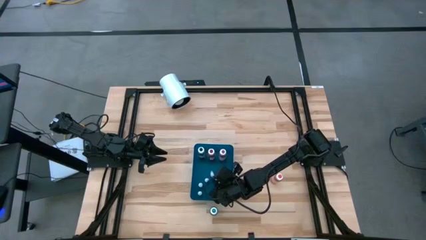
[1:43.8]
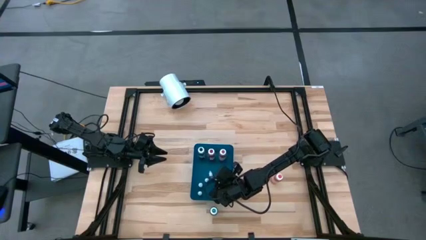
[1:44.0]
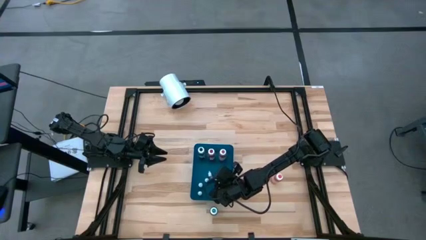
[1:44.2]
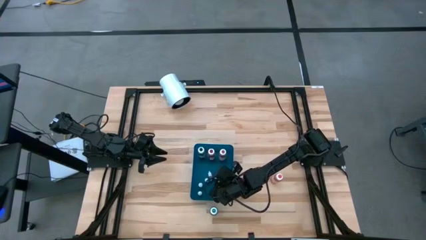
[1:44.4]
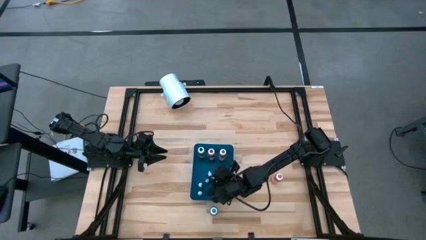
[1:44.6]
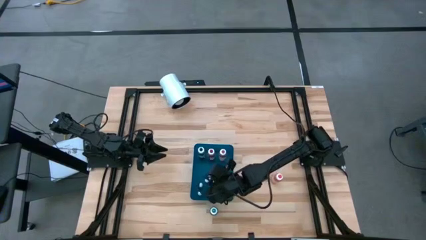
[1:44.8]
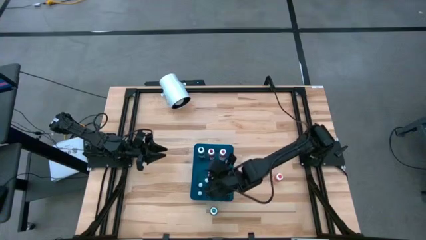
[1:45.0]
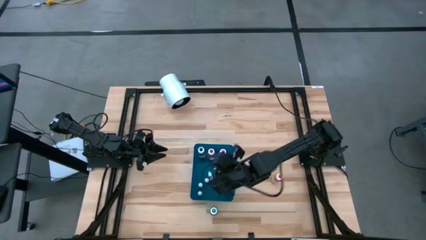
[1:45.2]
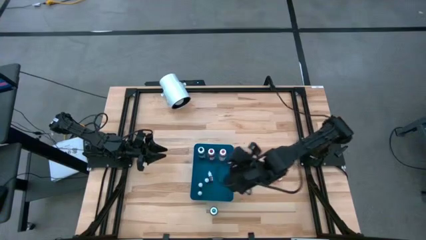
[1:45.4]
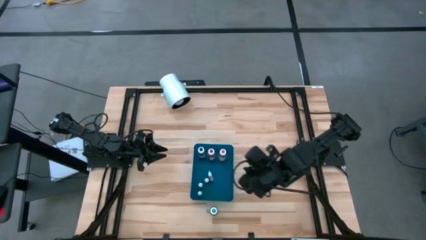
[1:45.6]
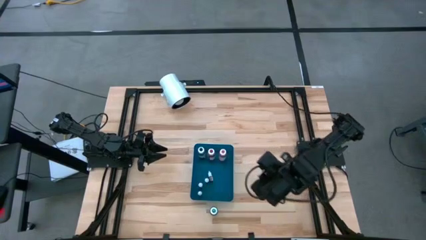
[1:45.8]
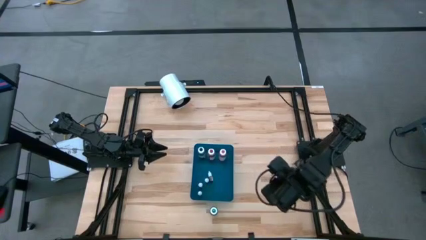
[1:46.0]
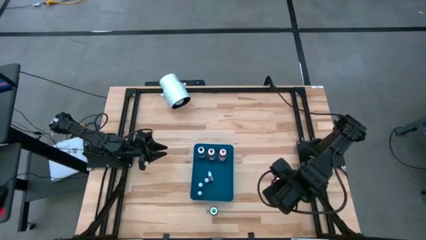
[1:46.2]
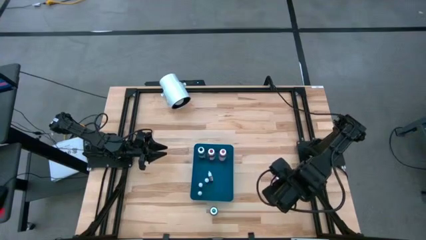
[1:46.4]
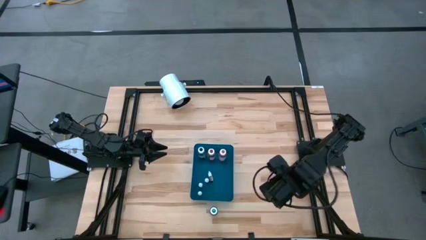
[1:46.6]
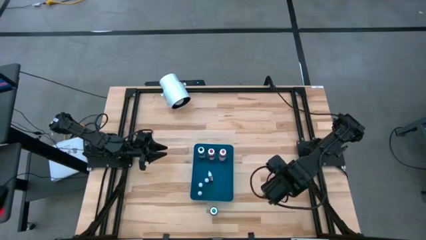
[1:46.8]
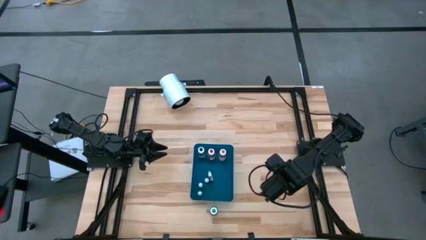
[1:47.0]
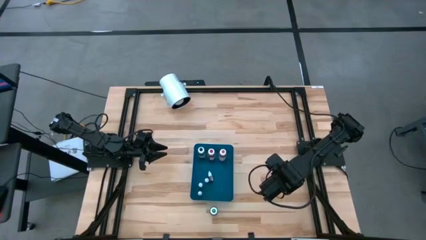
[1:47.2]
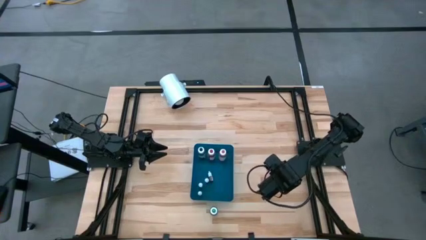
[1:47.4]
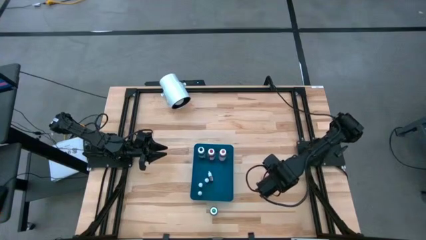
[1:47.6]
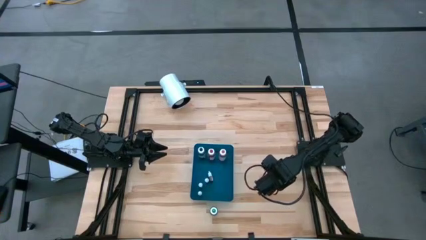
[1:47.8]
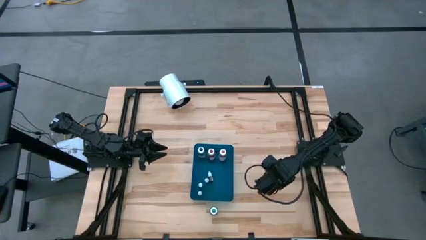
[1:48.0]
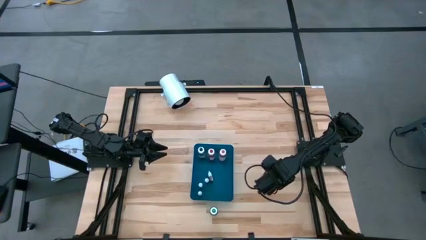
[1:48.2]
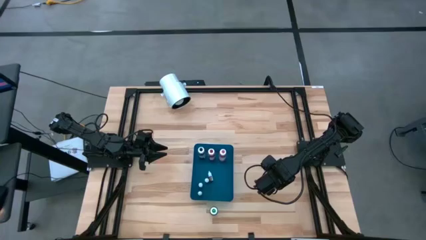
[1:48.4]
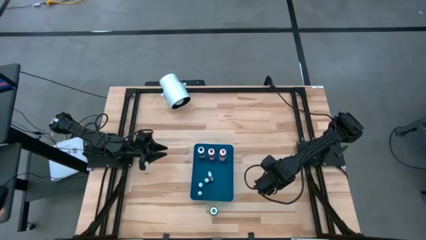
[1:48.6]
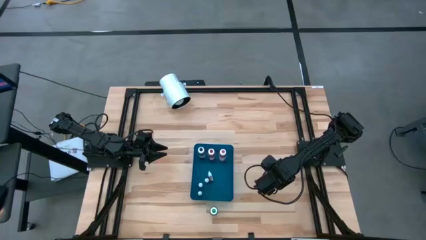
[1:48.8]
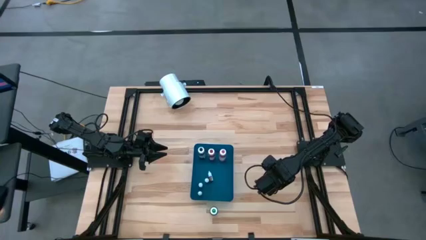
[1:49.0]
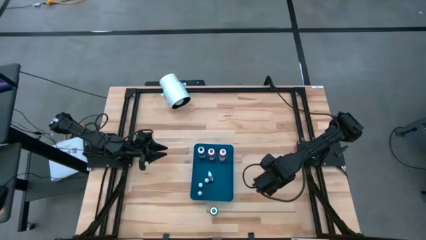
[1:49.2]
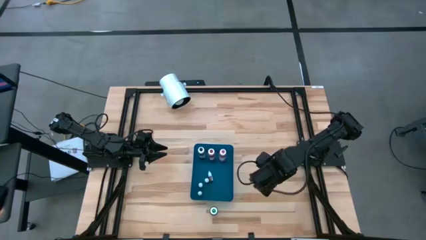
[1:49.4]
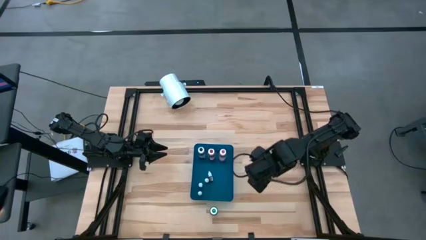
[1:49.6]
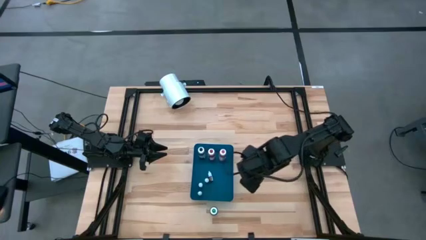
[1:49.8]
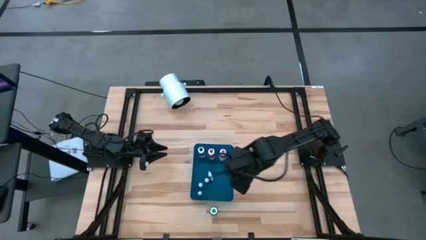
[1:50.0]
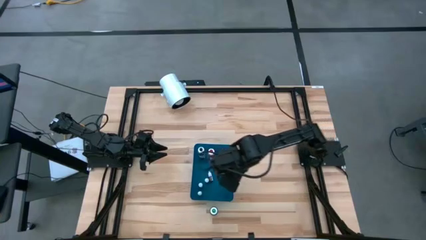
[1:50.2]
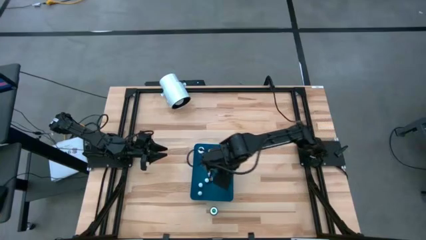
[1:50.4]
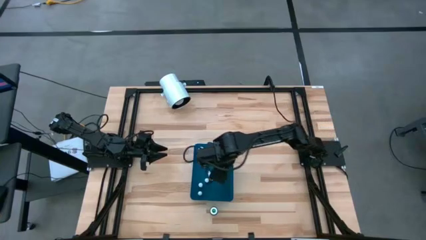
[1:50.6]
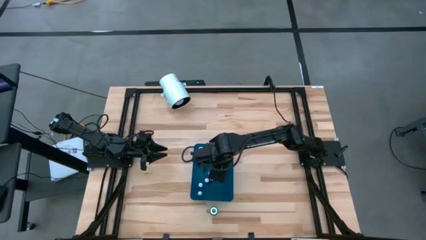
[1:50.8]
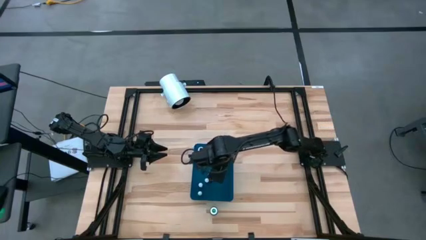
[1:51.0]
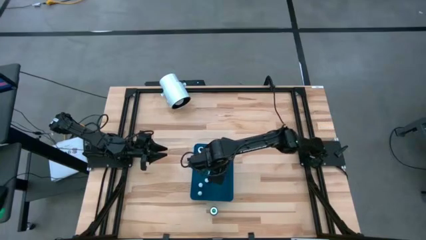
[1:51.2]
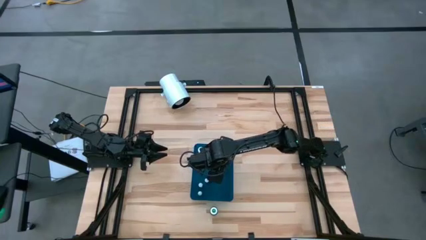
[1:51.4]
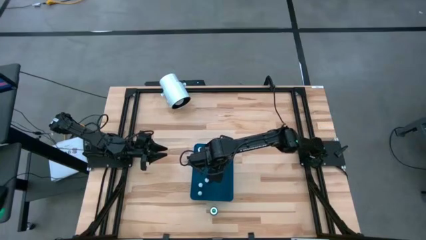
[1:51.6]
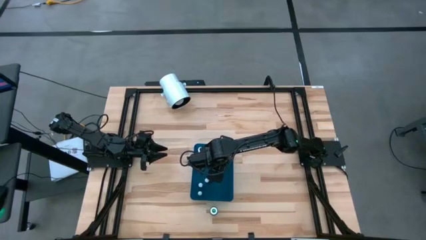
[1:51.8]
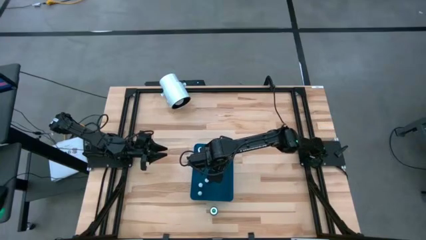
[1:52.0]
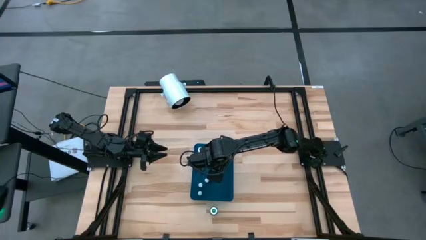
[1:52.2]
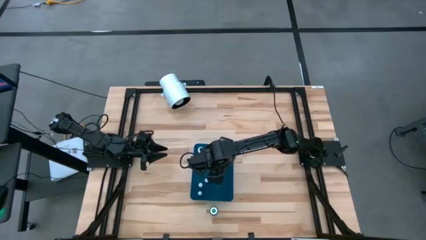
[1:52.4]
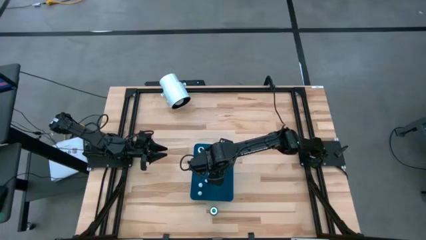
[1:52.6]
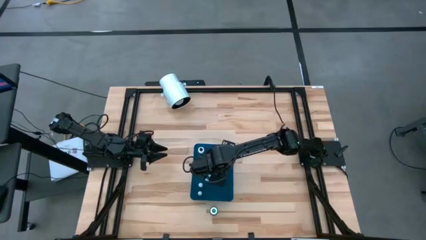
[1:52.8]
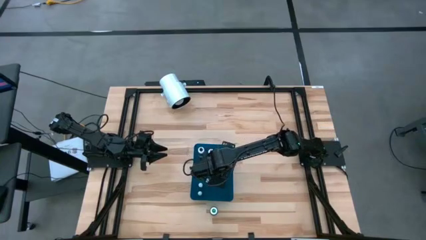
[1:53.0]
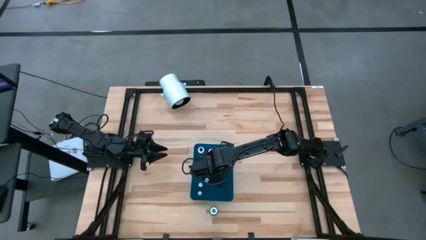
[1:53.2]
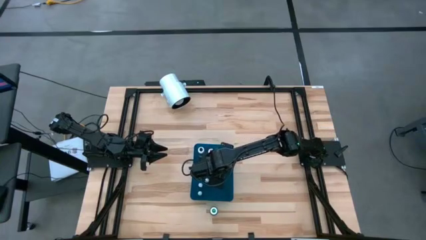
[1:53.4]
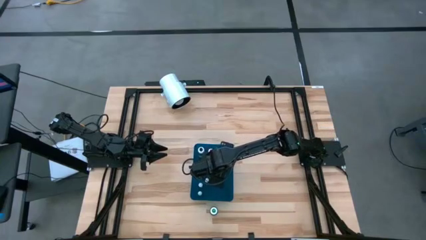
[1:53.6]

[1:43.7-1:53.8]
Task: Pick & Place food coloring
Put the large orange food coloring bottle into the blue bin

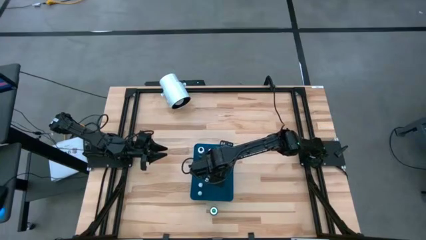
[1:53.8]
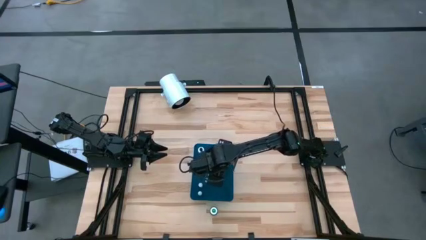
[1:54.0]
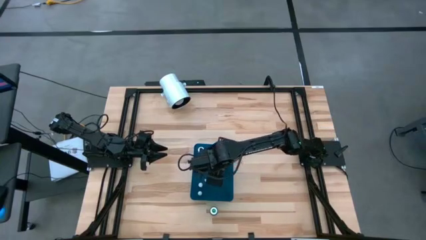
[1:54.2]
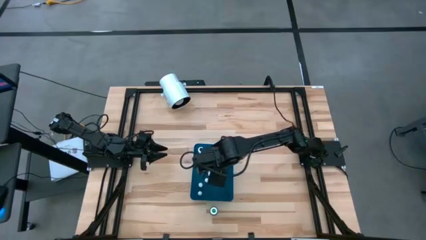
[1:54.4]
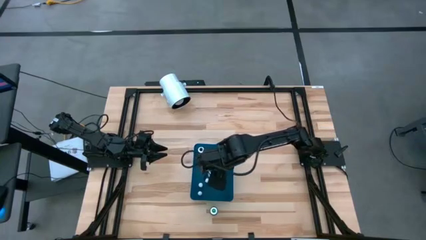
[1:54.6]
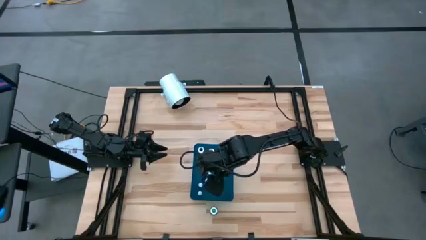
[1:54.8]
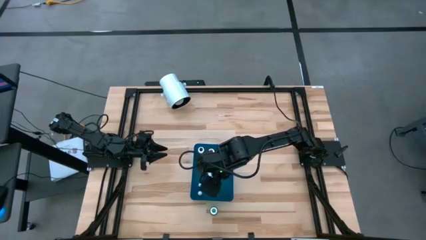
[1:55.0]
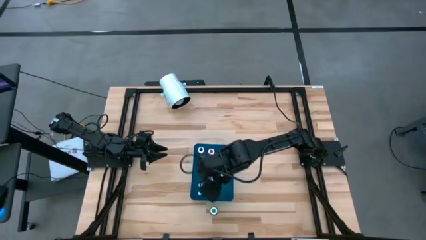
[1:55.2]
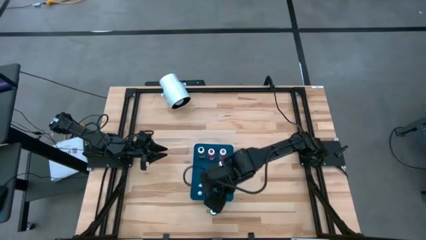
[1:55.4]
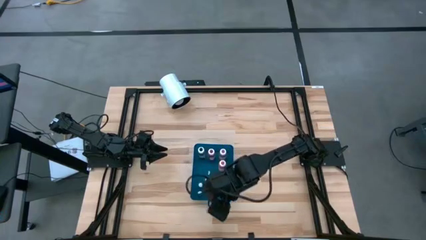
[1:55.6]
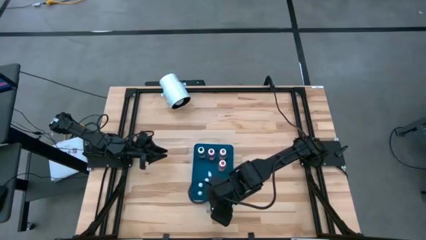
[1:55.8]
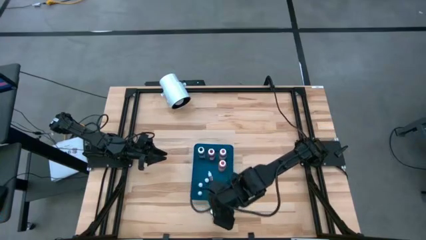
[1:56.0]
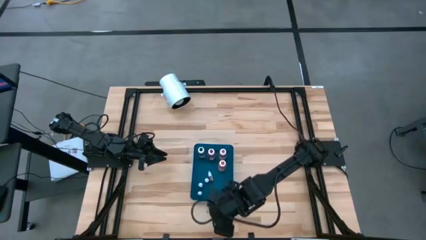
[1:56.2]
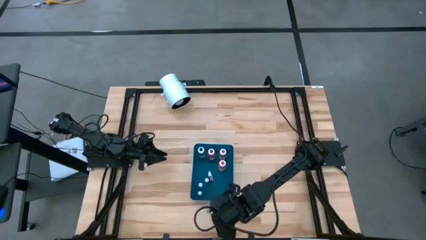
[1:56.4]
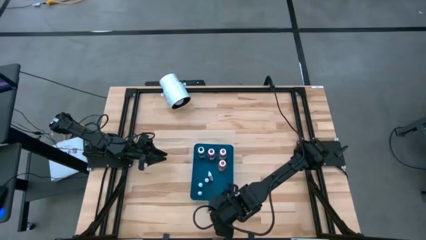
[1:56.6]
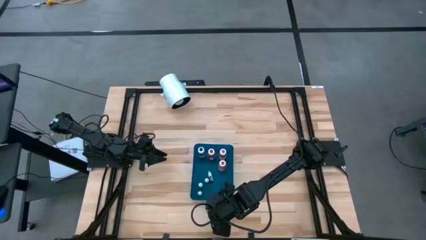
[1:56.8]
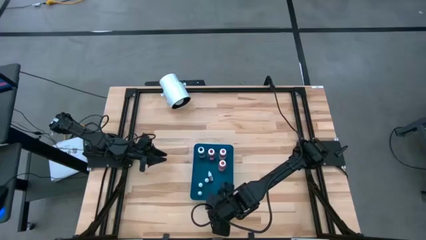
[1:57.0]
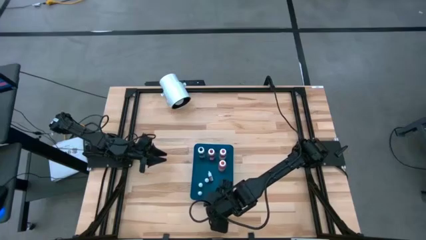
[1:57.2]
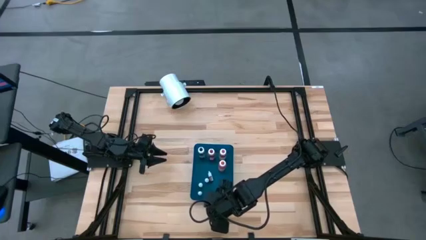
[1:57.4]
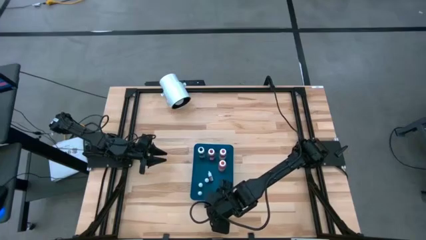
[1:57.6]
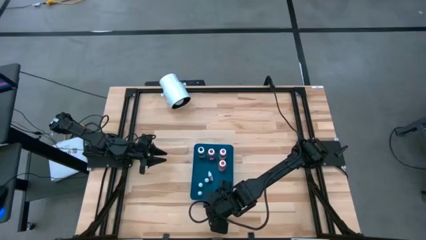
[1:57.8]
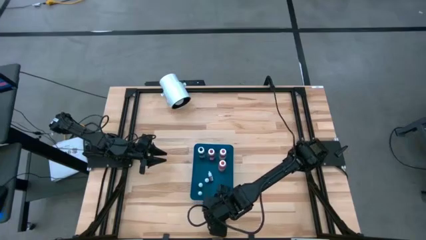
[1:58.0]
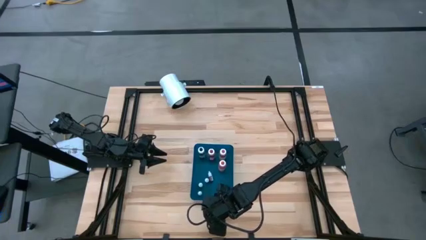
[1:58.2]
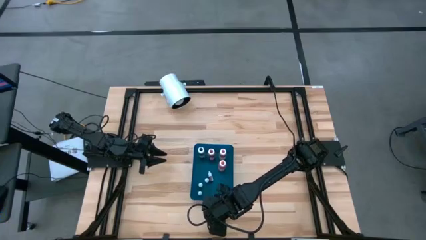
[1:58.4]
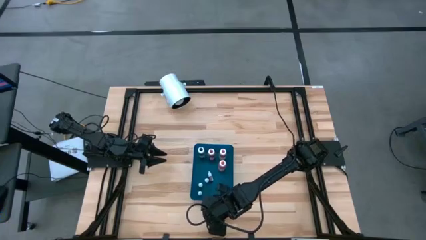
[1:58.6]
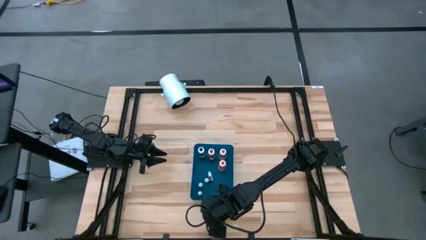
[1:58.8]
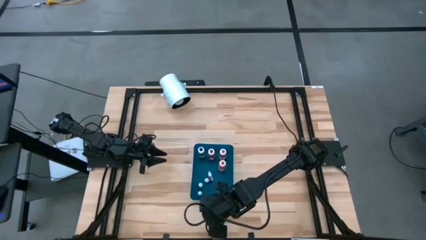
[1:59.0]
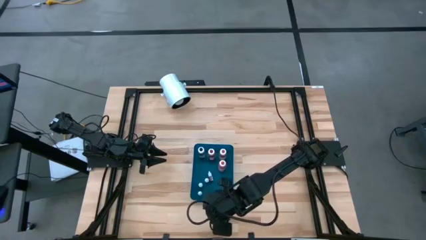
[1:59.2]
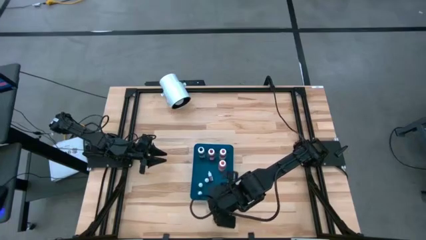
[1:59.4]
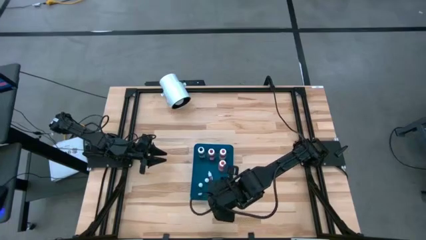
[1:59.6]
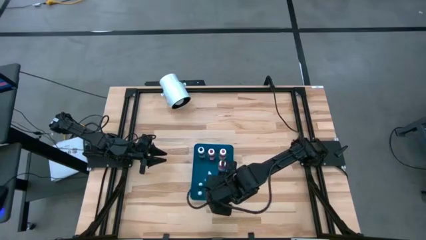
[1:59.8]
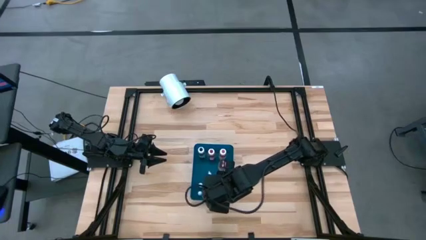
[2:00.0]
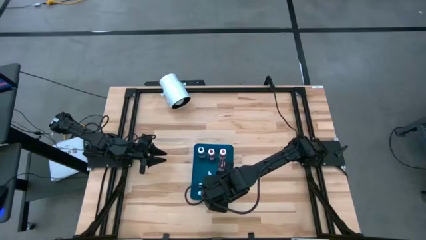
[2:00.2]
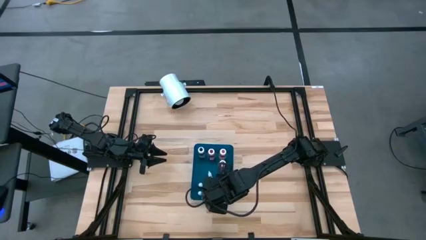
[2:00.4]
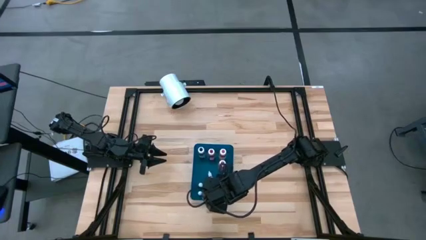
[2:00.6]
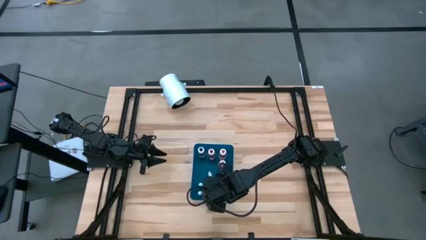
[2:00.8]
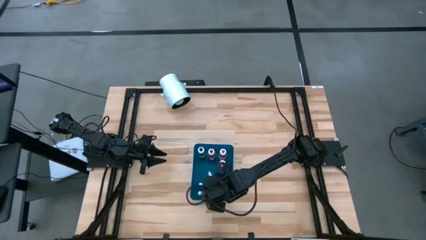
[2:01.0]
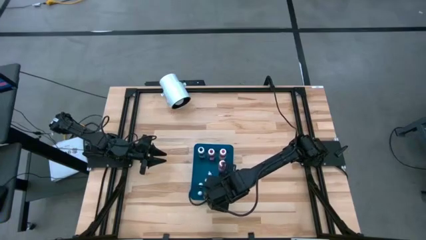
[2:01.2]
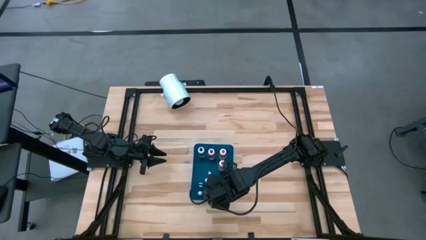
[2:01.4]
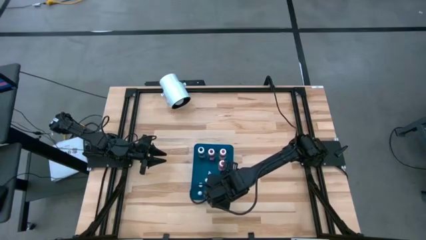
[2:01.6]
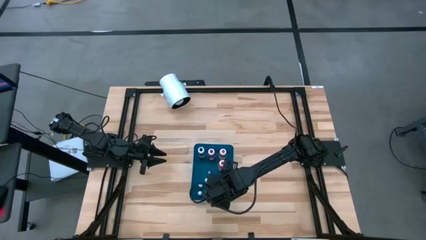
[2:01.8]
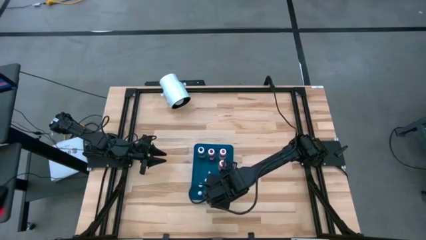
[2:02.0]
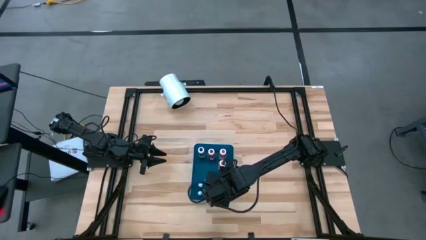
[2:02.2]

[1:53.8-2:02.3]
Put the large green food coloring bottle into the blue bin
